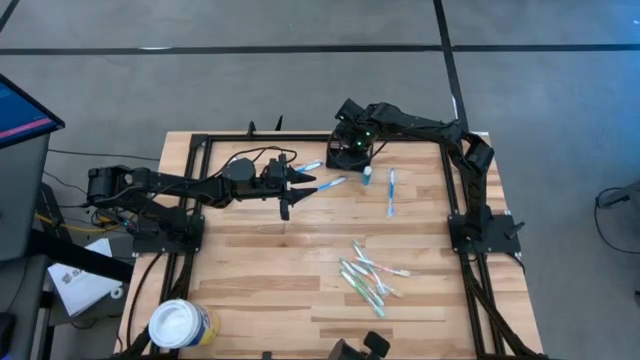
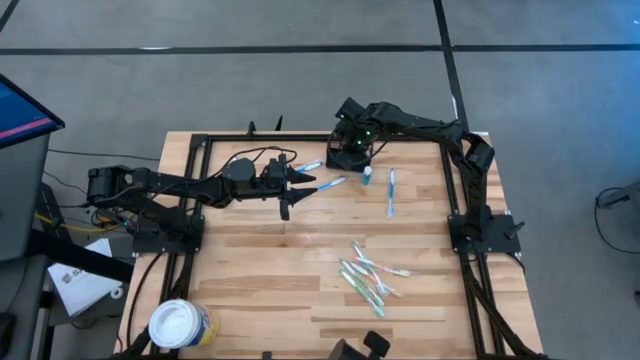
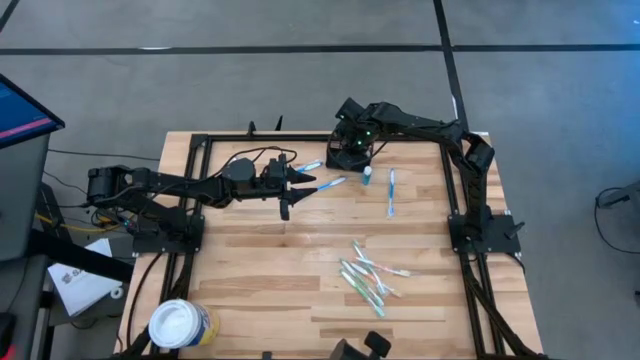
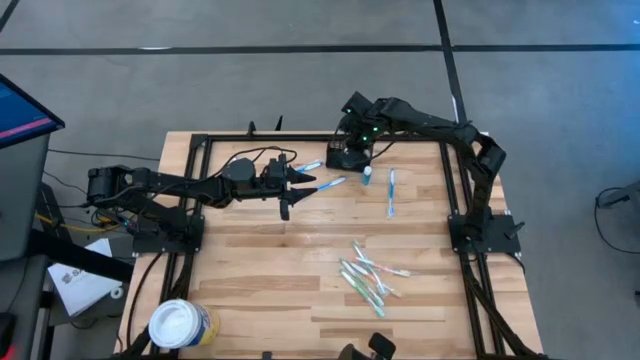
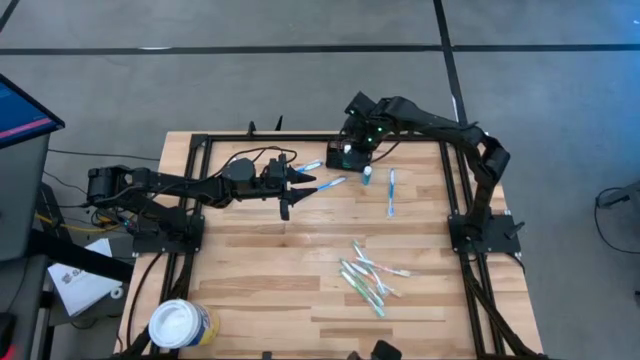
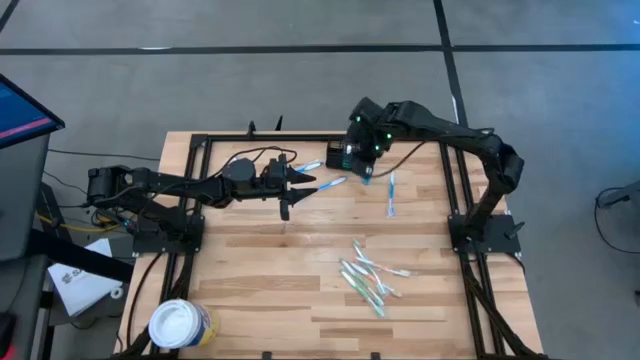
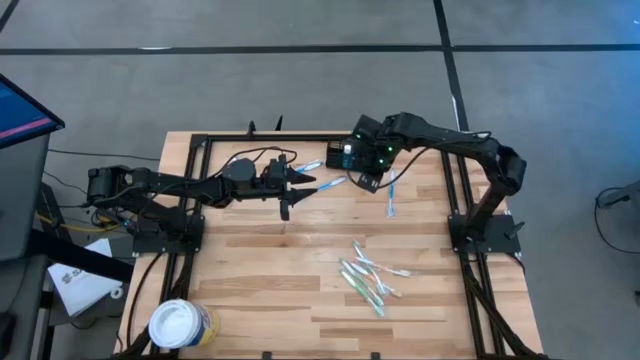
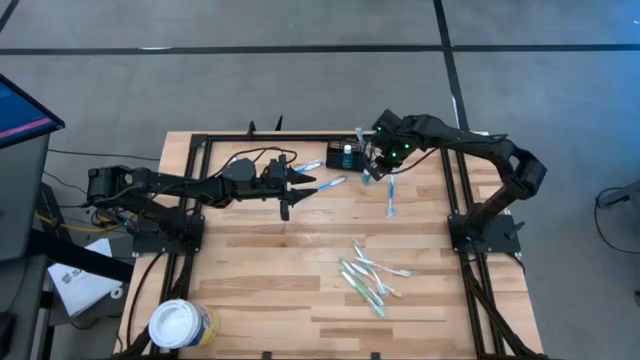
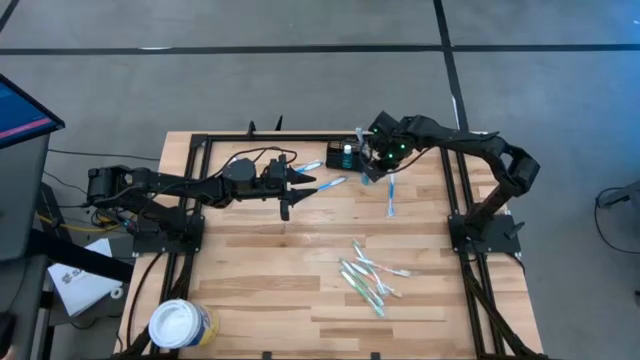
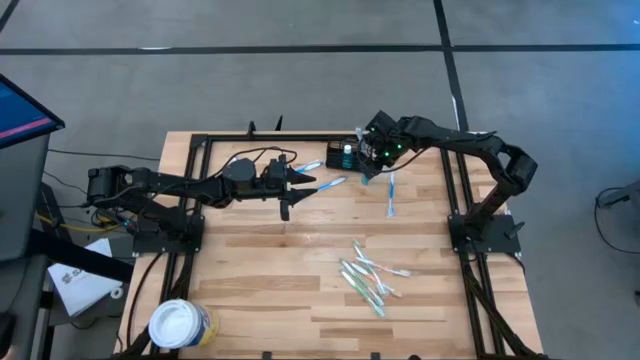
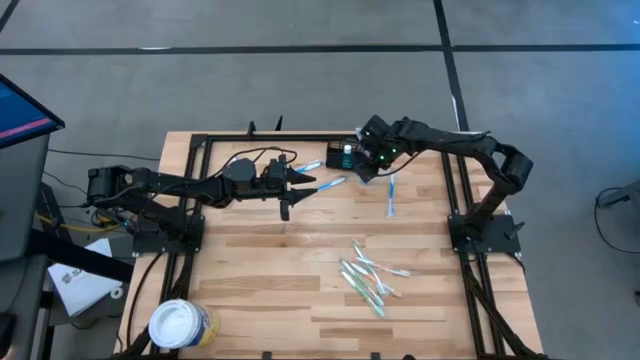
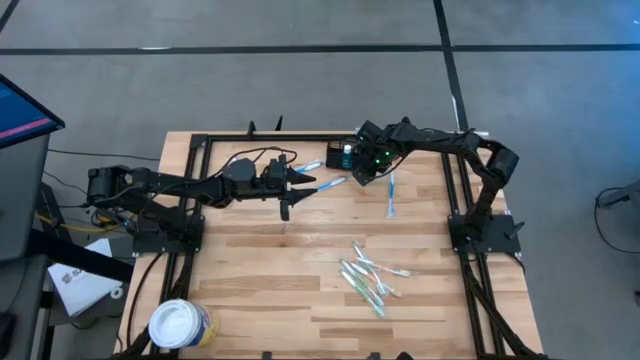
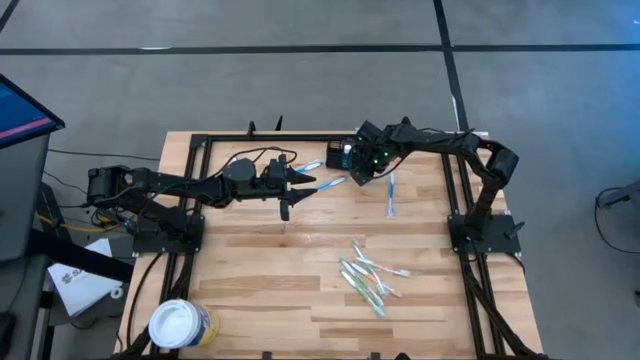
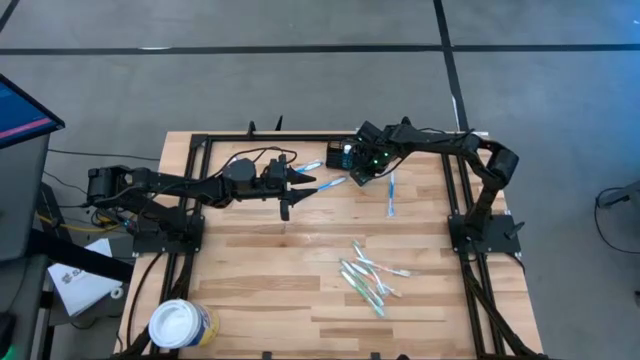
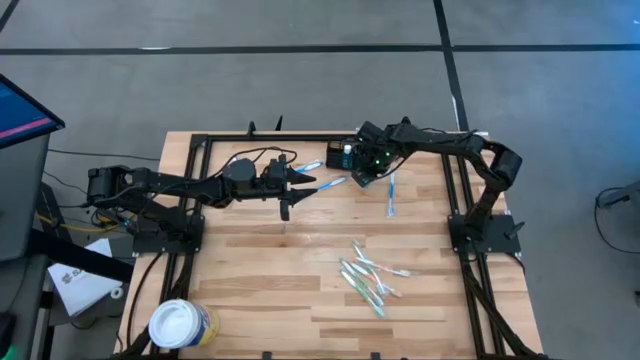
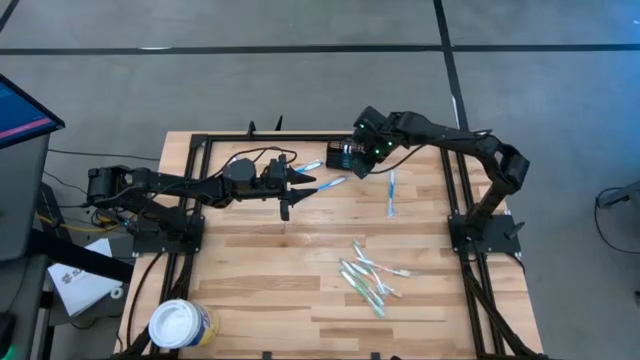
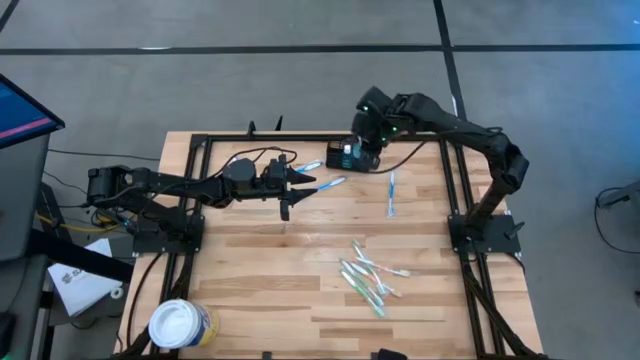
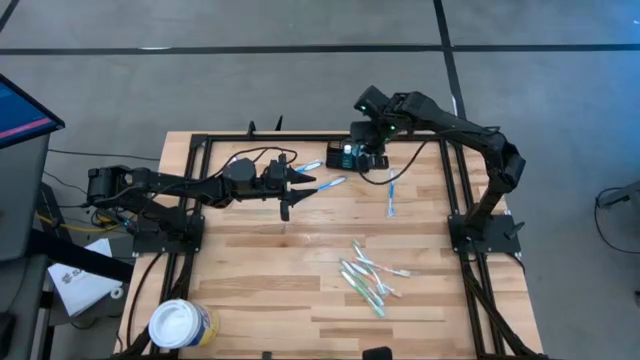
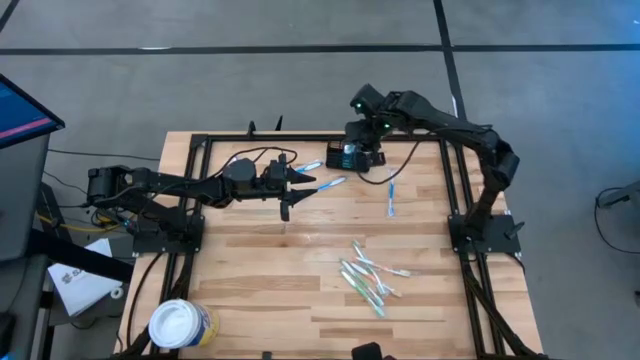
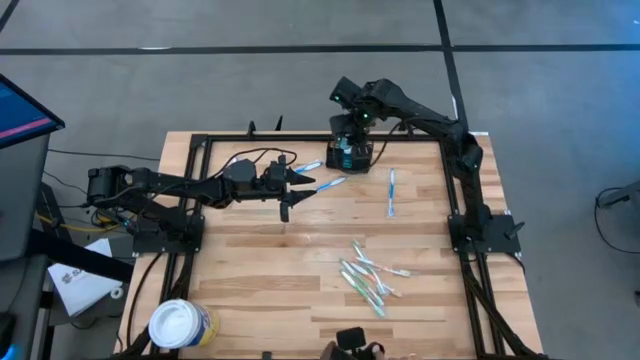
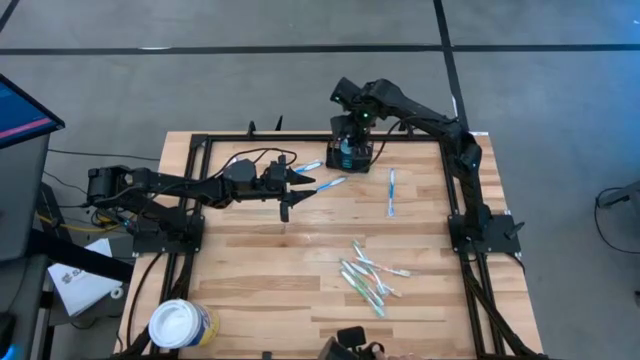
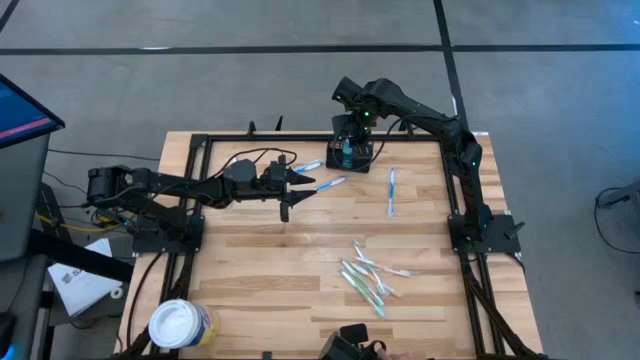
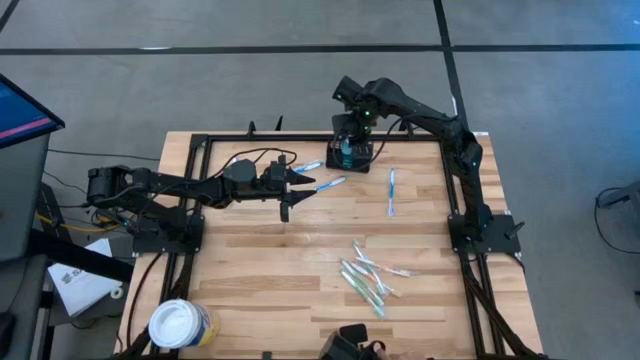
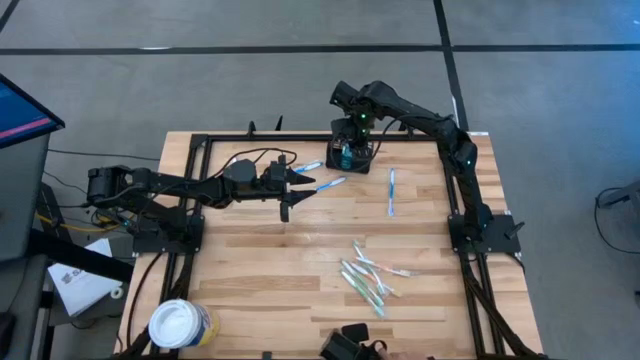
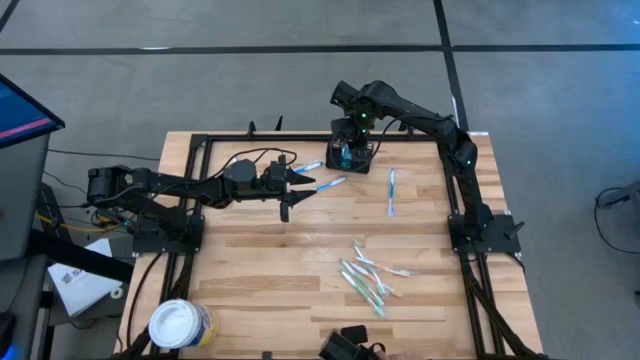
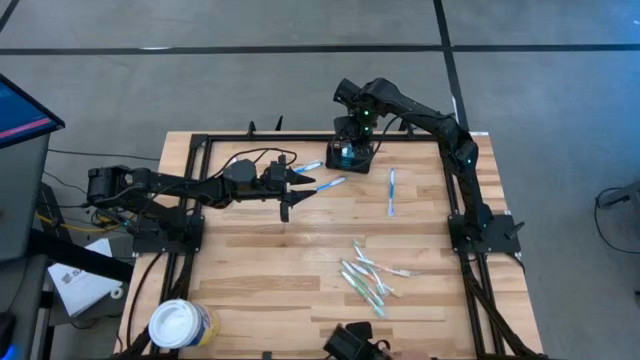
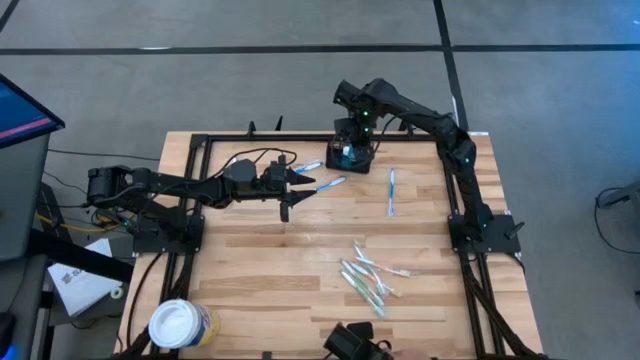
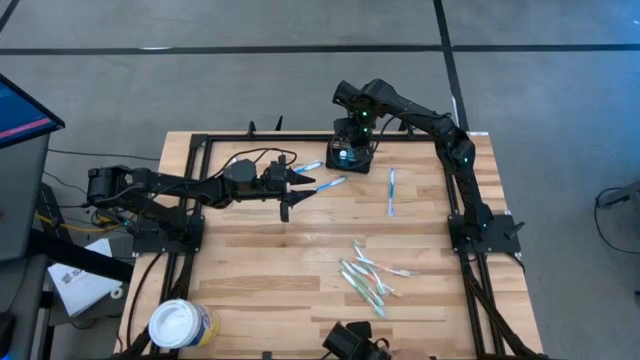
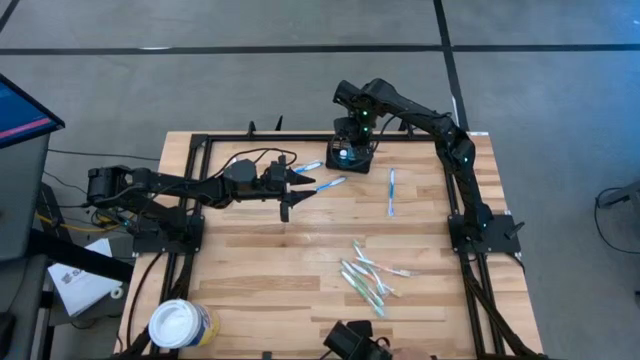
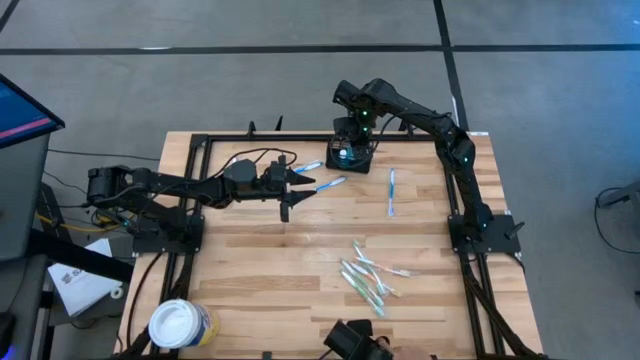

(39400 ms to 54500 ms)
Task: Pick & Place toothbrushing station
Put the mouthwash into the mesh organizer

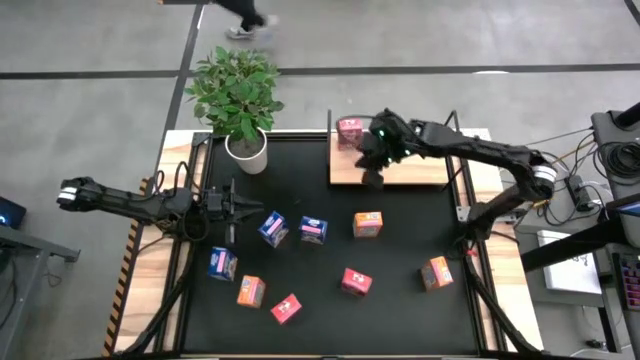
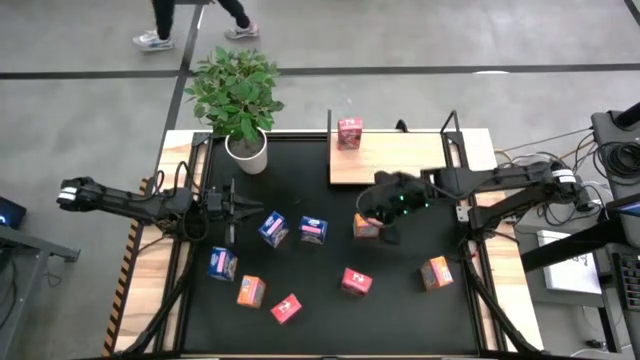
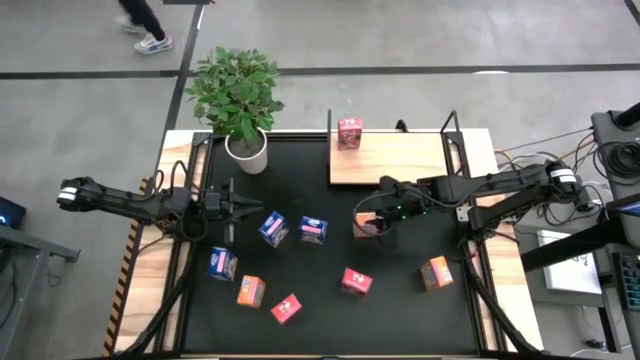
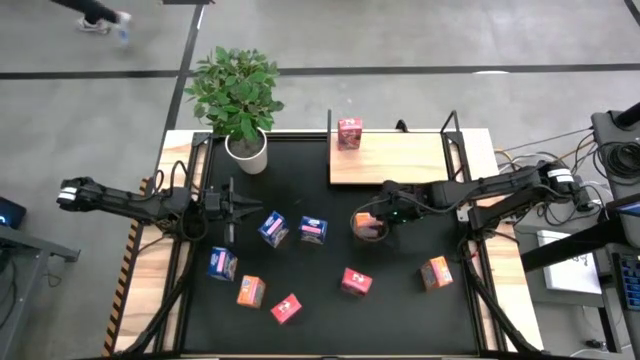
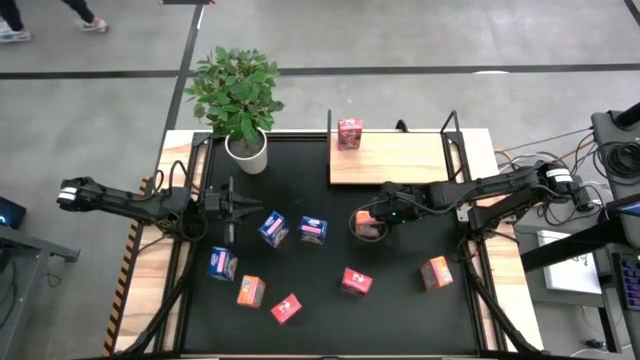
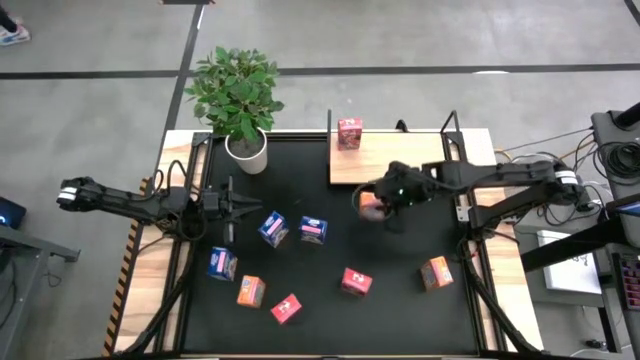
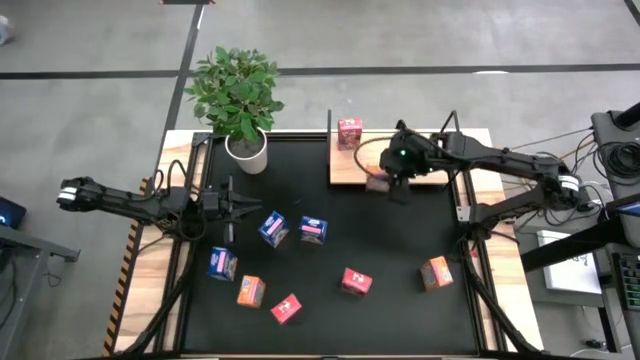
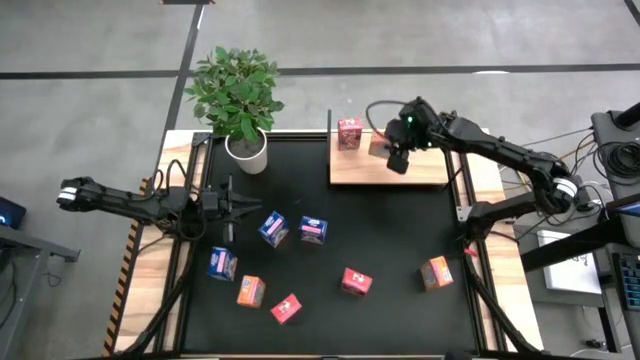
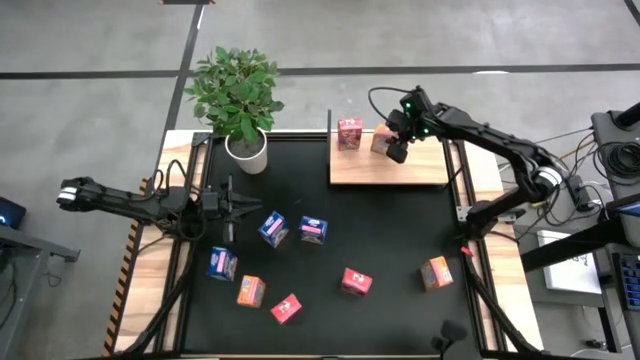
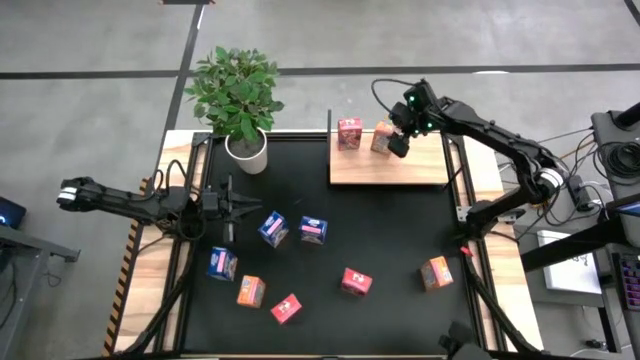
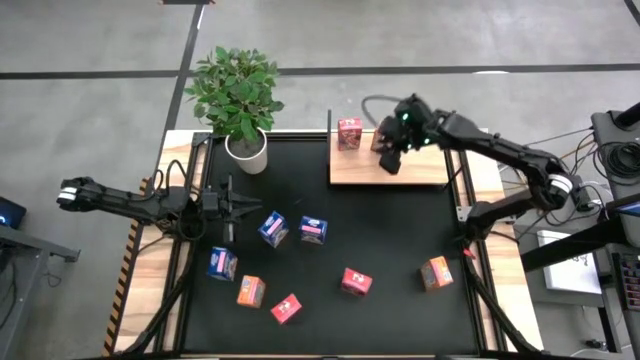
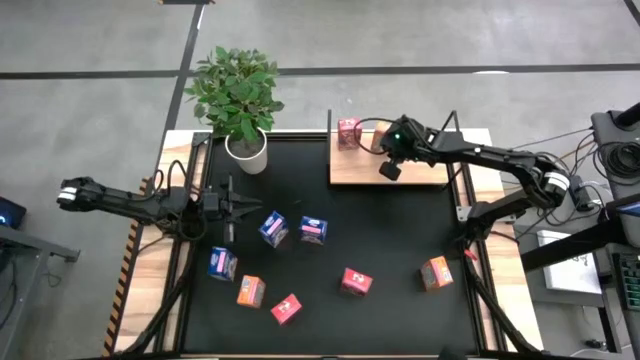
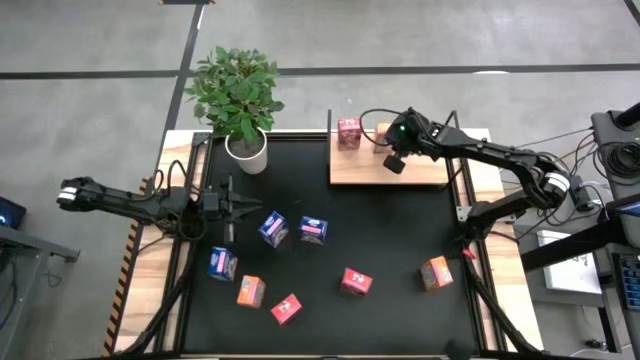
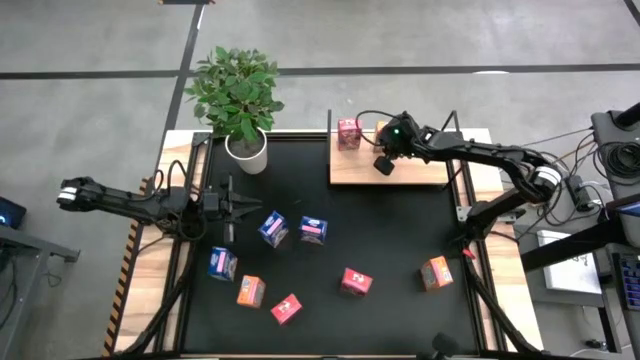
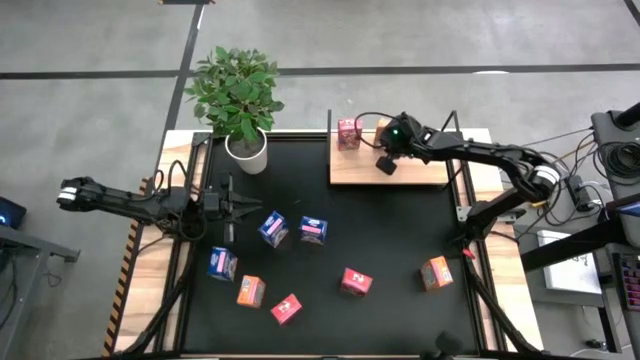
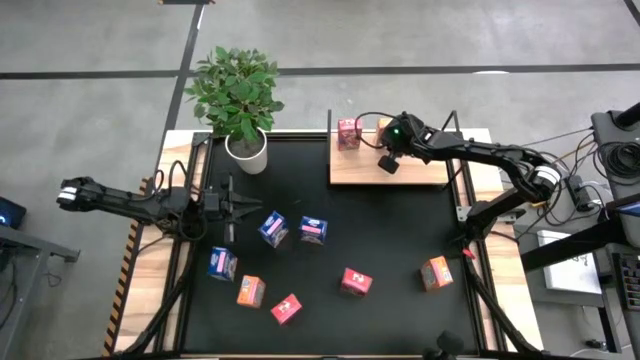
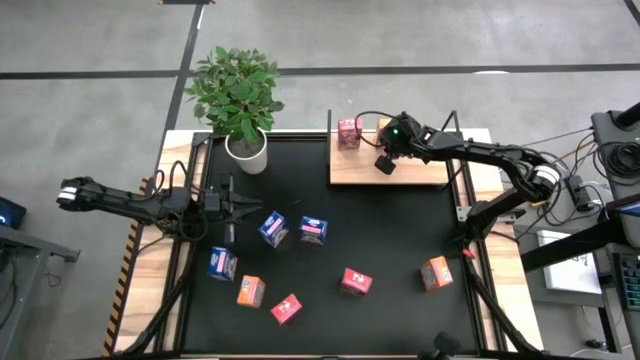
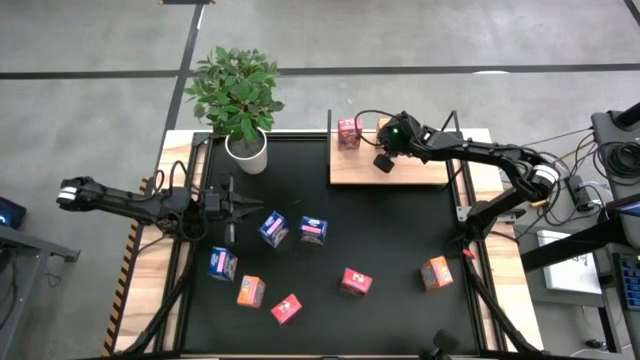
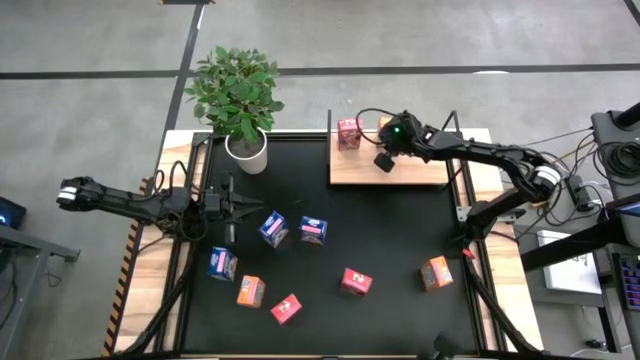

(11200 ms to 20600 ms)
Task: Stack cereal on shelf
Put the top orange cereal box on the shelf
